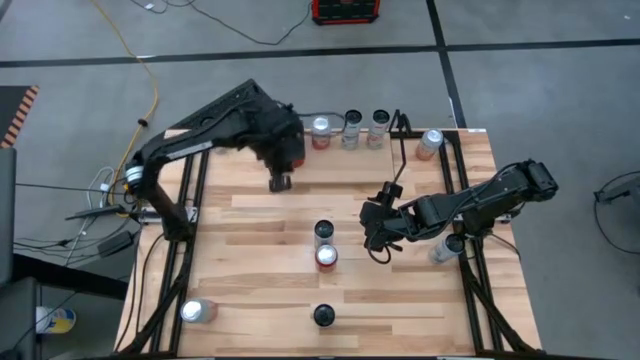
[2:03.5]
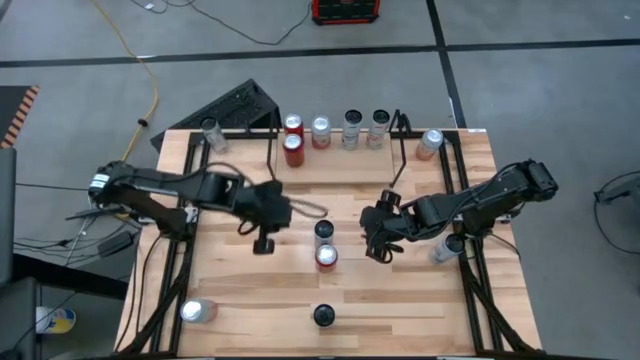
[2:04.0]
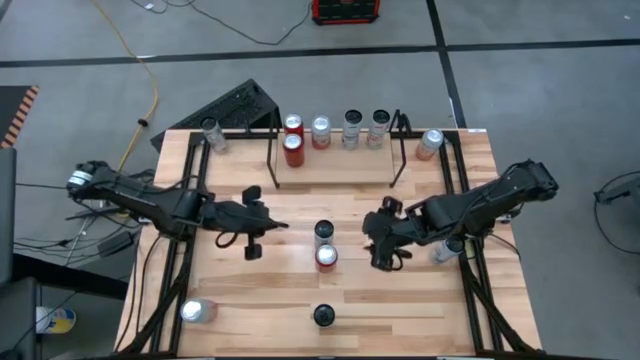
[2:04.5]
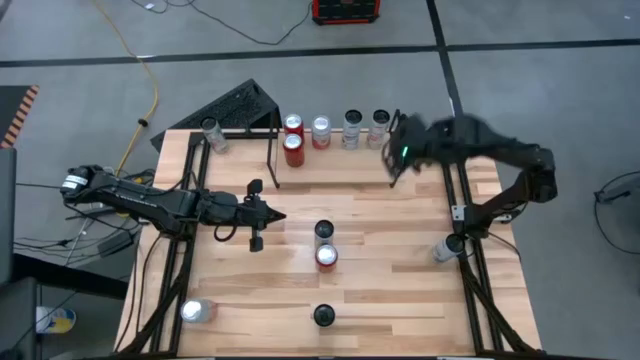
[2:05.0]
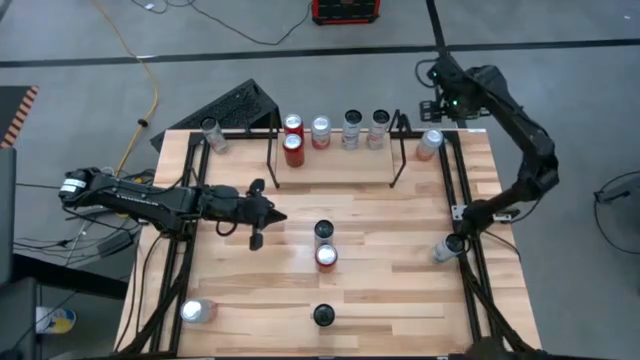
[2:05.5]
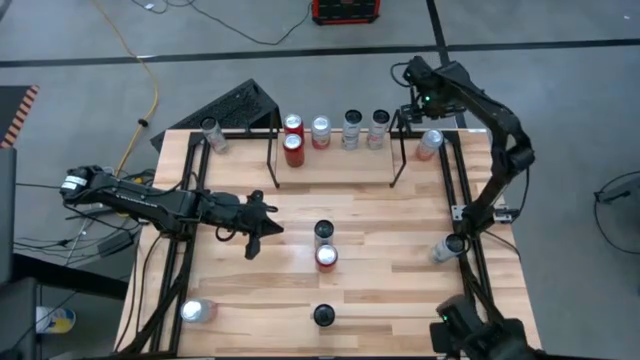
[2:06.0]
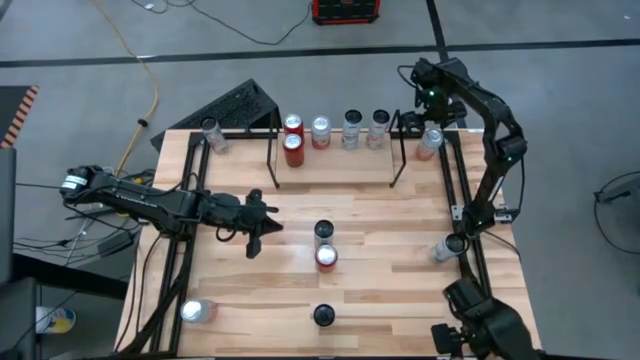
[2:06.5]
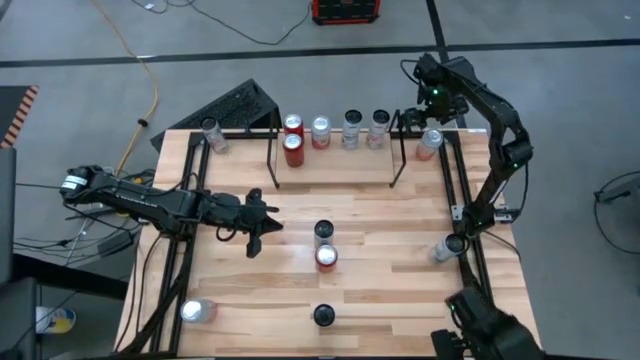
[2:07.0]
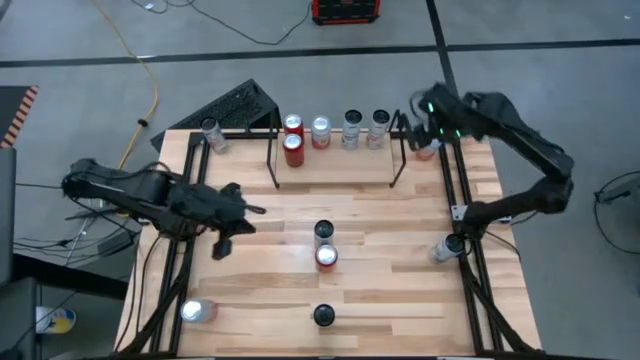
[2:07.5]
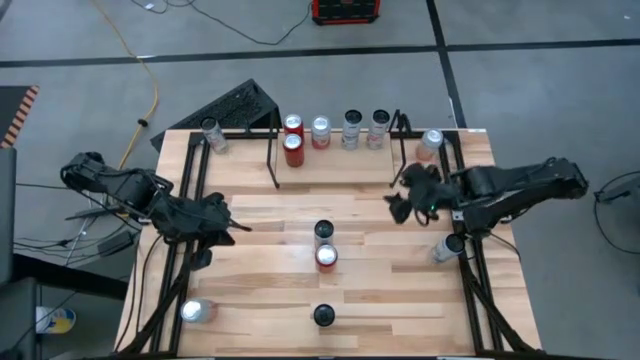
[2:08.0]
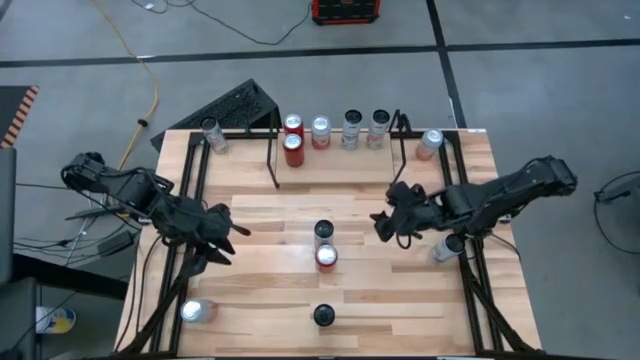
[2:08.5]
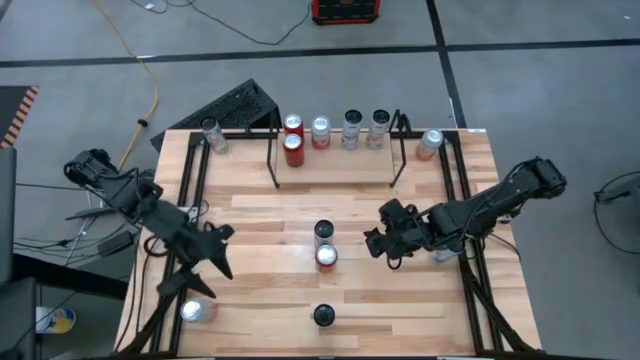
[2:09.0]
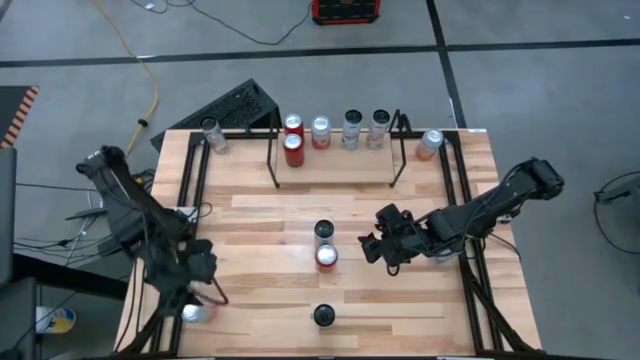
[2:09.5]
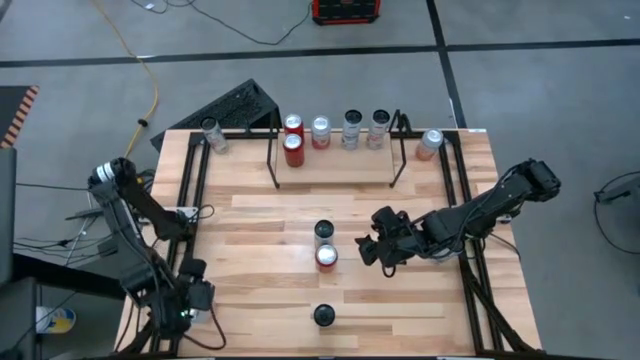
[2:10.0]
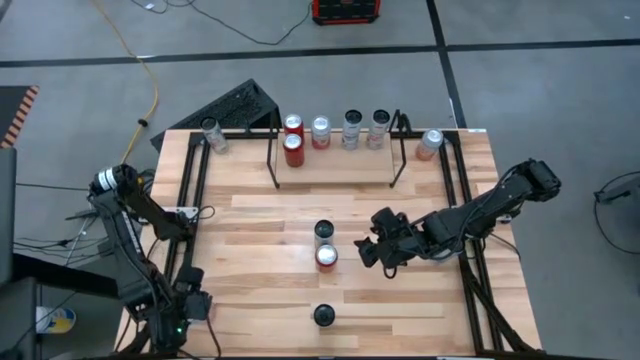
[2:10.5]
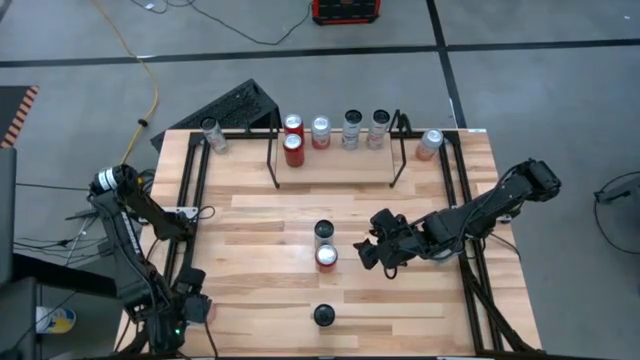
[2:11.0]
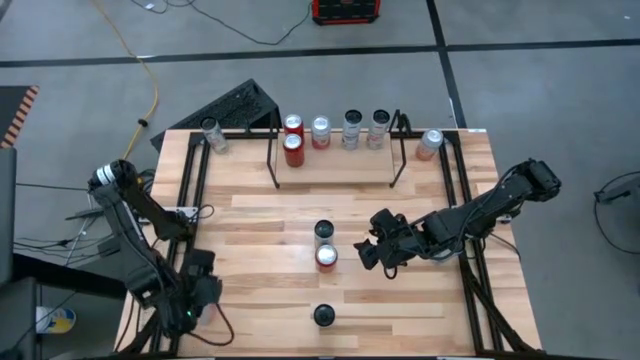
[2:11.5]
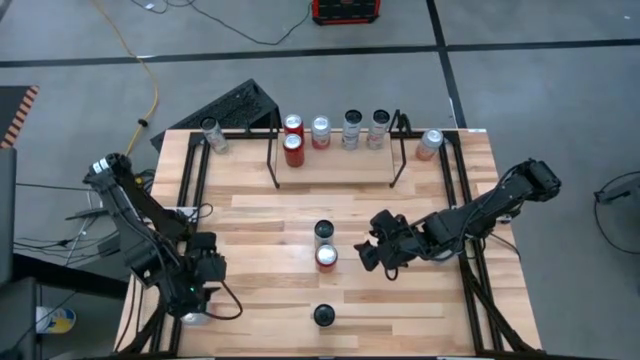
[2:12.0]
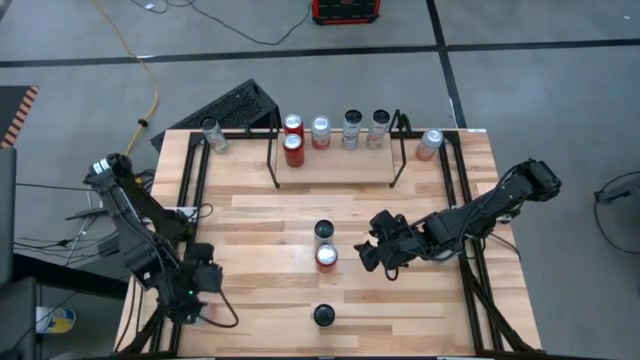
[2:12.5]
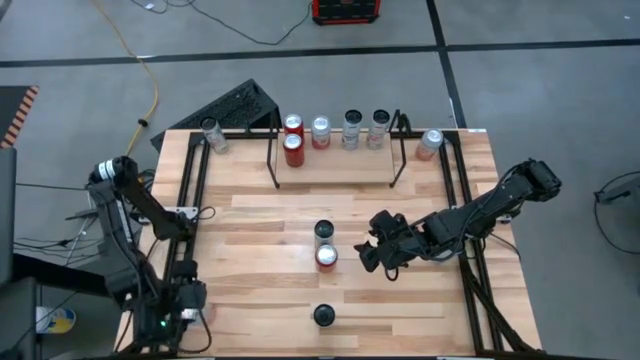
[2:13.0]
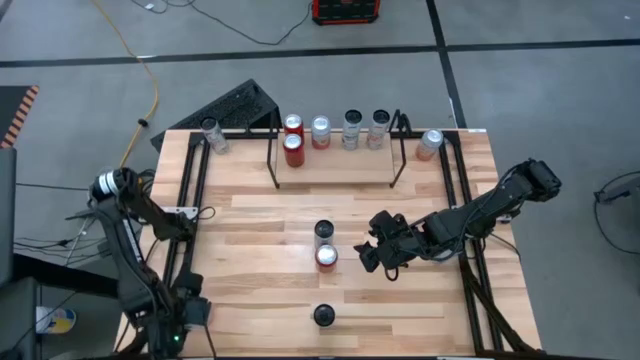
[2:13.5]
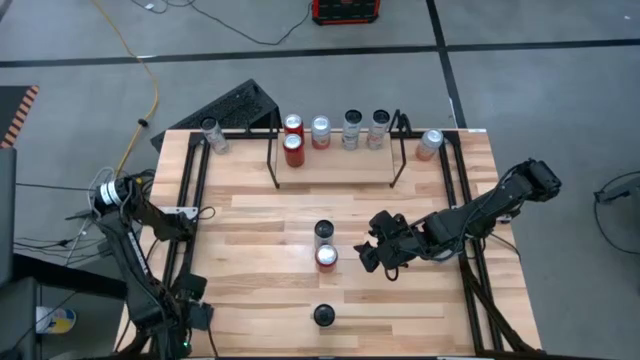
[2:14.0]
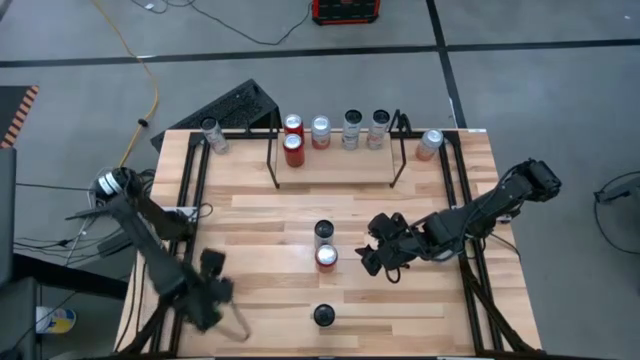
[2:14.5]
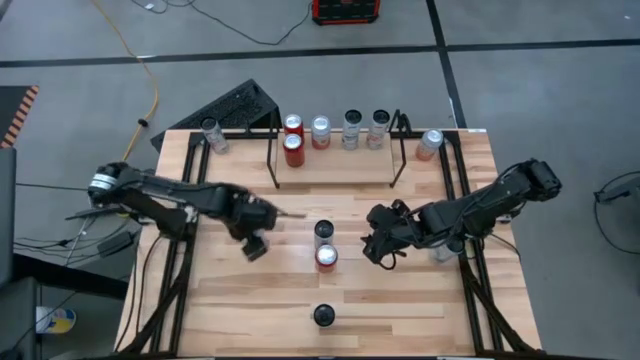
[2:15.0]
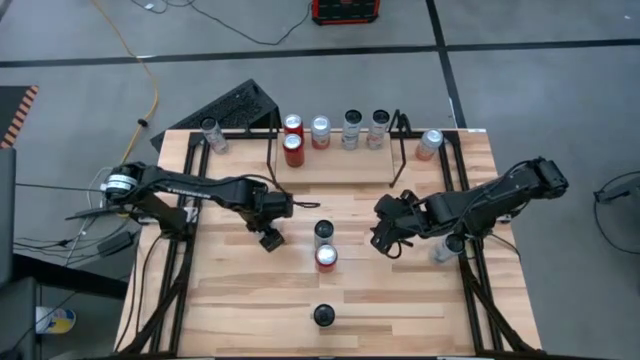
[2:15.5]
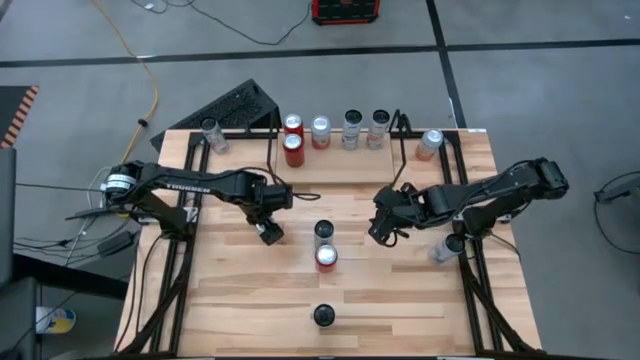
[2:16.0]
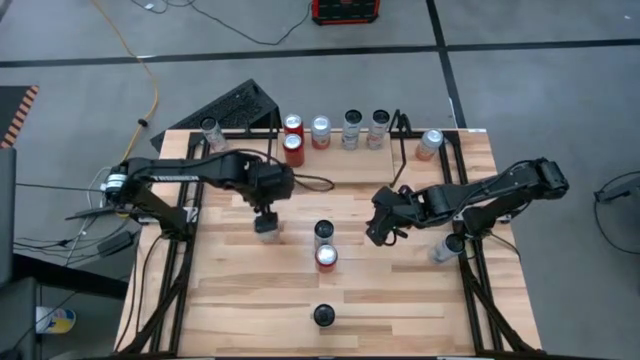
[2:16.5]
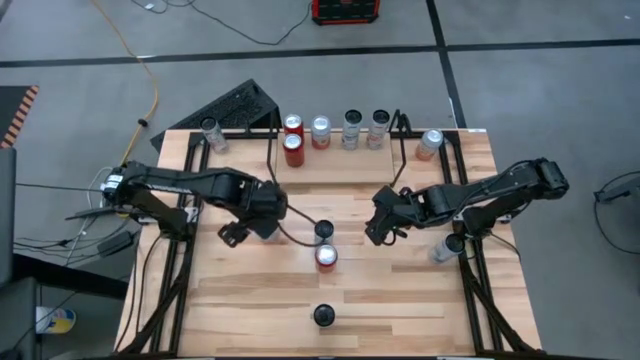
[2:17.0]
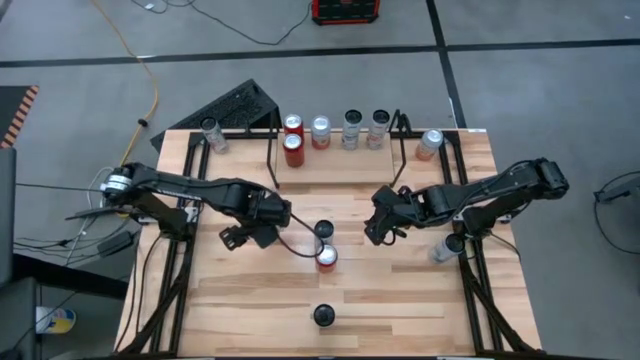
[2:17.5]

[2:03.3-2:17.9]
Task: Place canned beverage on shelf
Put the bottom orange white soda can on the shelf
